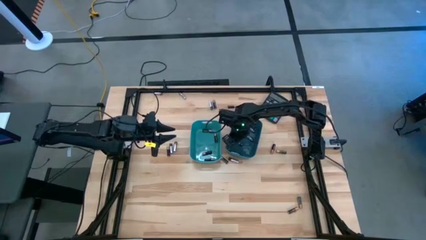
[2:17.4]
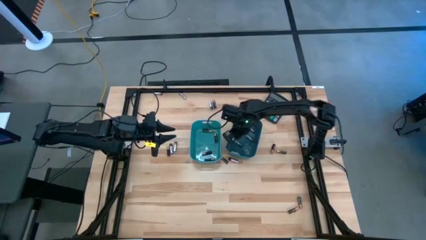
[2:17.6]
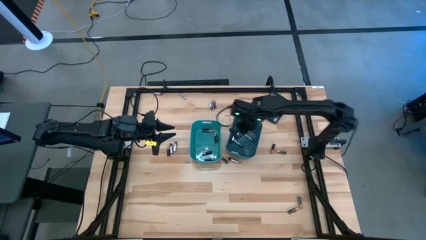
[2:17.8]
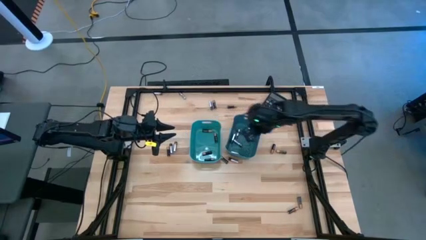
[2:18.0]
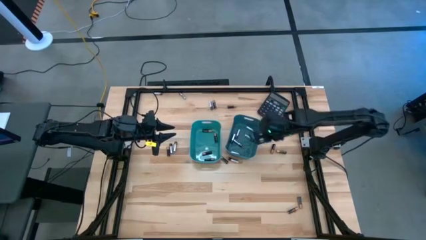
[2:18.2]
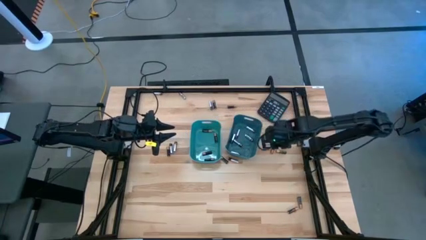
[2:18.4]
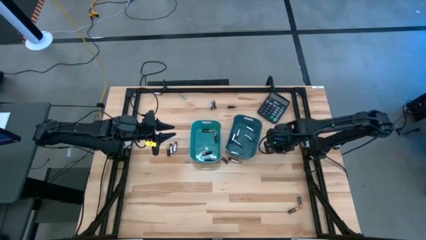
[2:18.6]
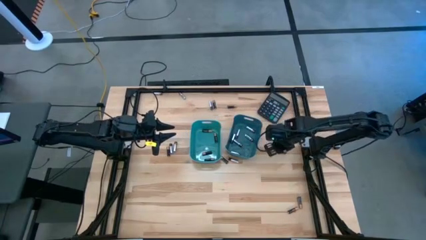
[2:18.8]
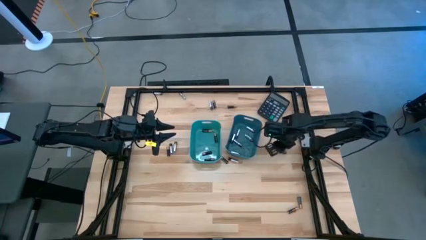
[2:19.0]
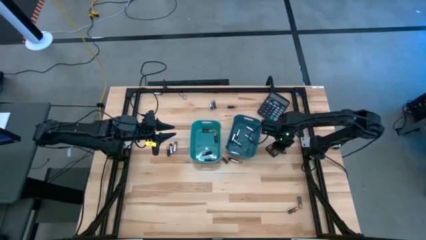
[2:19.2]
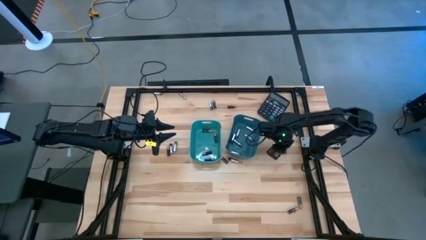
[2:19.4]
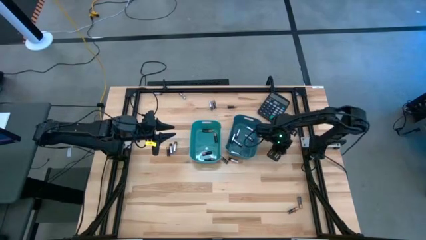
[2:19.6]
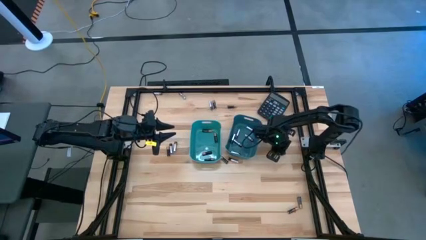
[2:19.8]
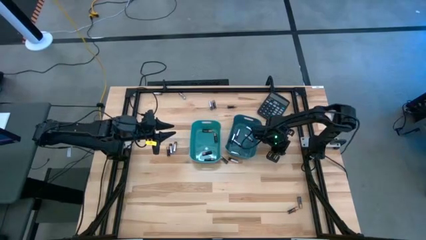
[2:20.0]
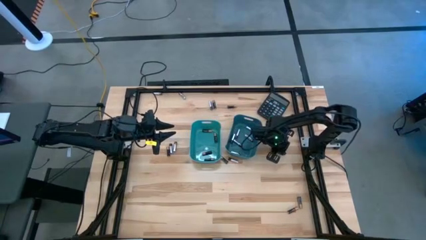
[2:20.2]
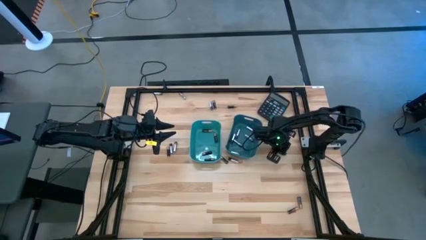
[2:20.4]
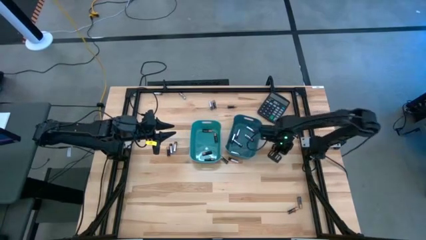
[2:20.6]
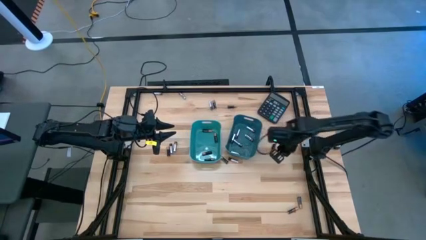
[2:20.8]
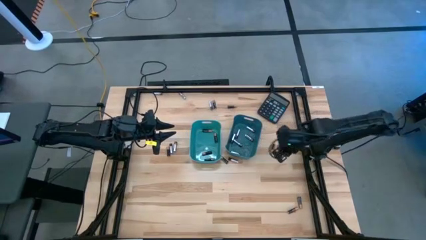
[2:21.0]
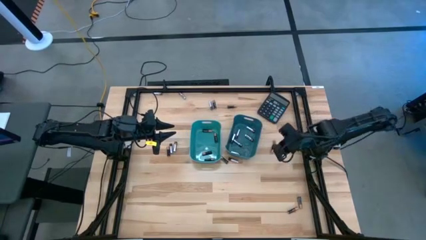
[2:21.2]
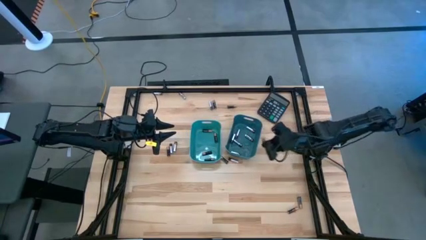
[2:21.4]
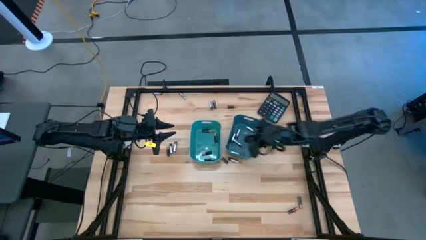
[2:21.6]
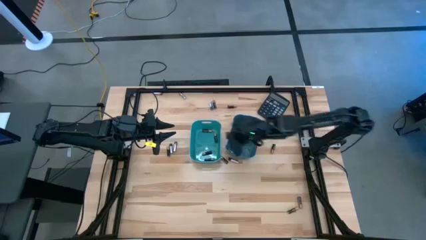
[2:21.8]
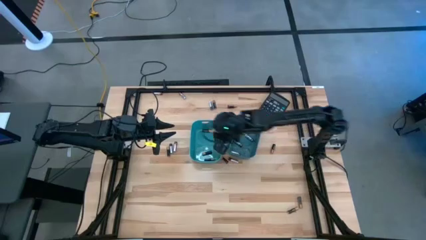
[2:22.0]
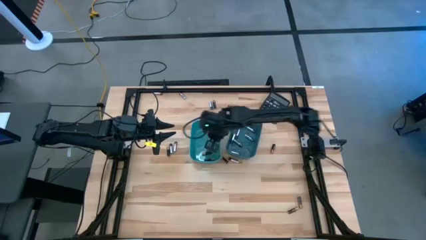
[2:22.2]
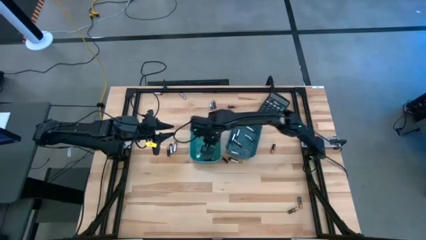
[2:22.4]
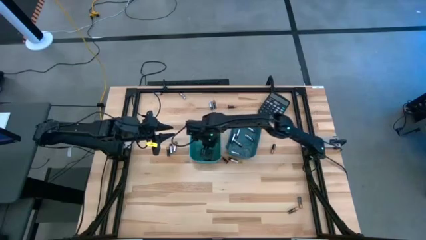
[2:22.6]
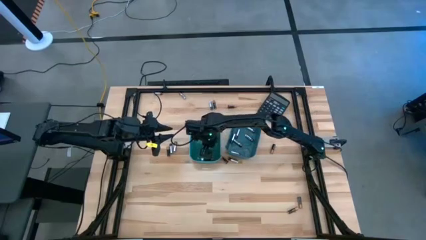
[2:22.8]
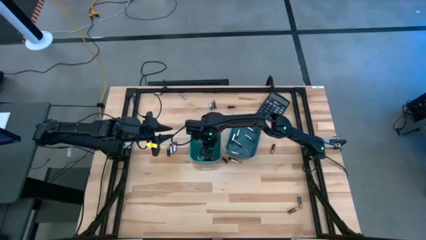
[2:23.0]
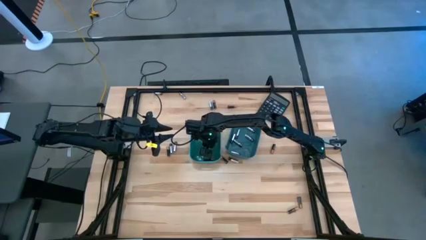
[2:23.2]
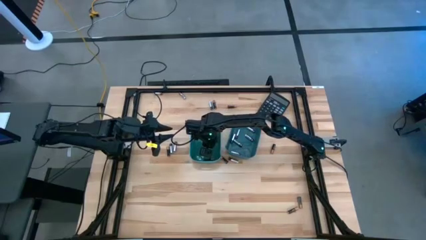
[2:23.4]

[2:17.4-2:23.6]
Task: Sort batteries
Put the black battery into the green bin

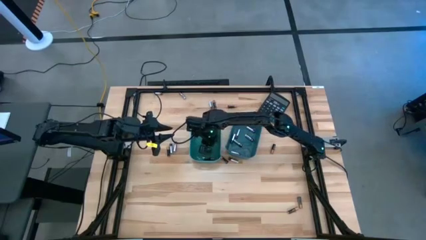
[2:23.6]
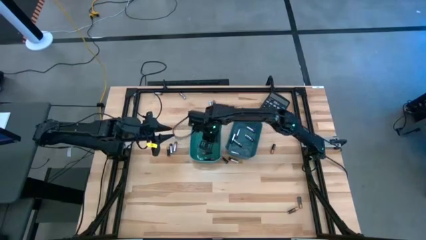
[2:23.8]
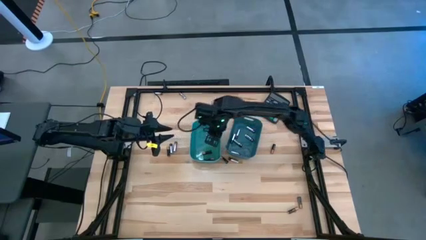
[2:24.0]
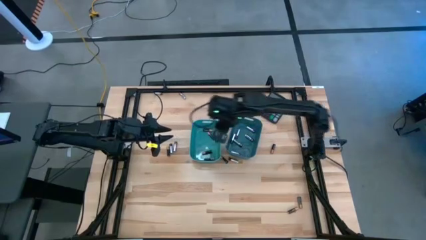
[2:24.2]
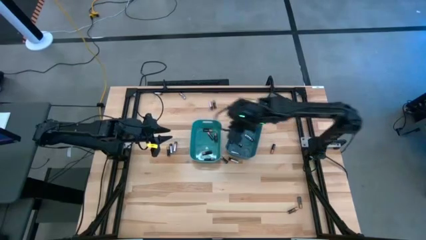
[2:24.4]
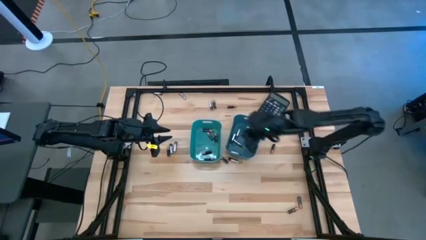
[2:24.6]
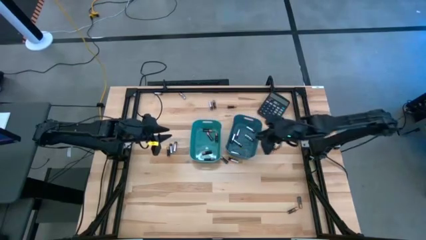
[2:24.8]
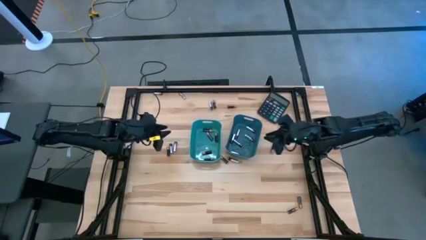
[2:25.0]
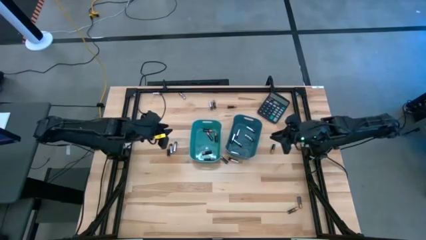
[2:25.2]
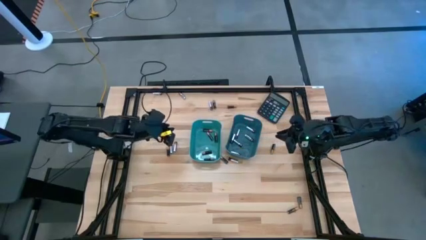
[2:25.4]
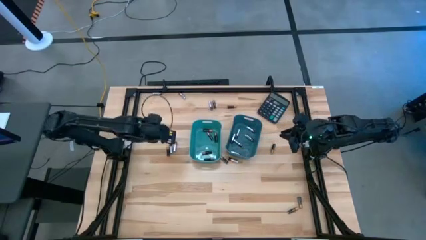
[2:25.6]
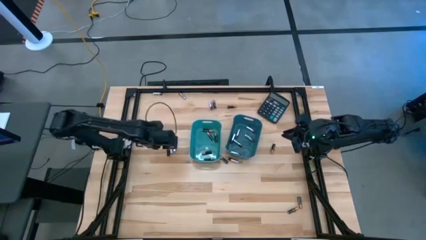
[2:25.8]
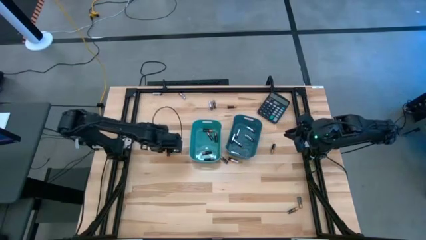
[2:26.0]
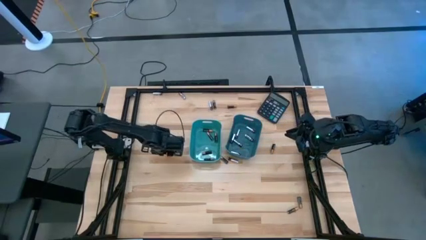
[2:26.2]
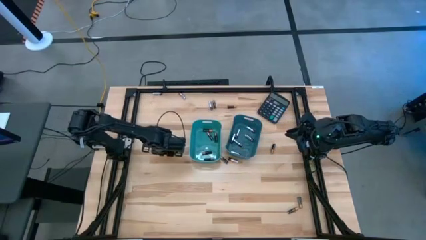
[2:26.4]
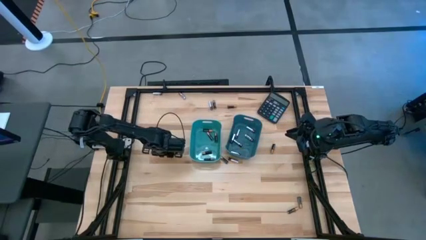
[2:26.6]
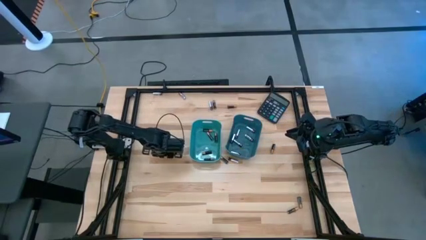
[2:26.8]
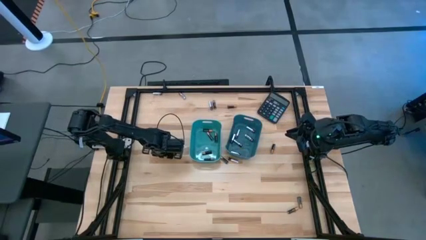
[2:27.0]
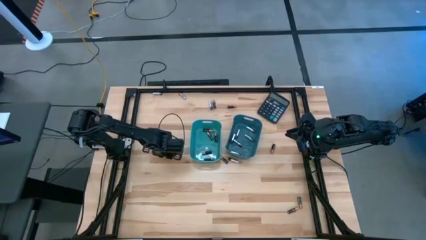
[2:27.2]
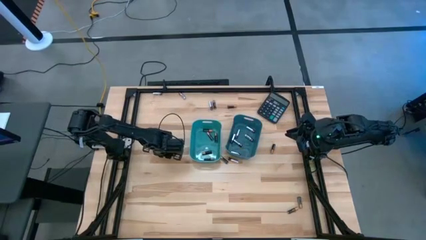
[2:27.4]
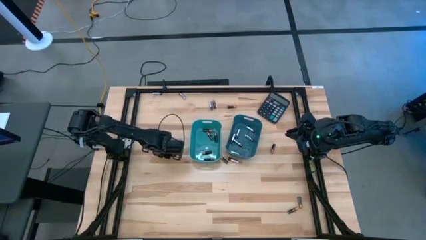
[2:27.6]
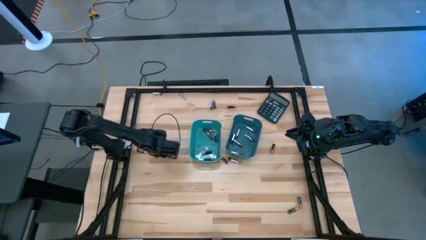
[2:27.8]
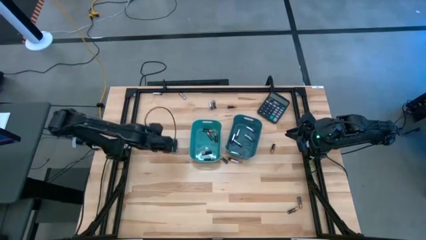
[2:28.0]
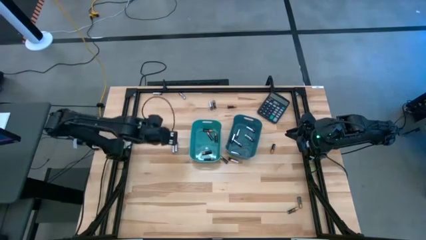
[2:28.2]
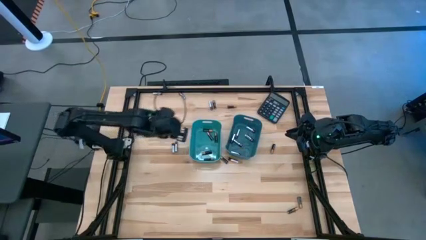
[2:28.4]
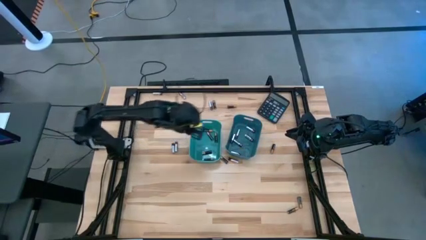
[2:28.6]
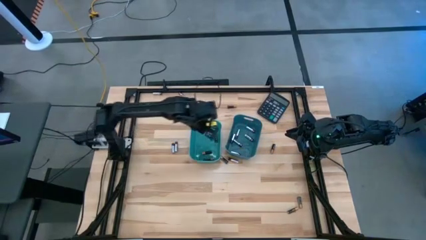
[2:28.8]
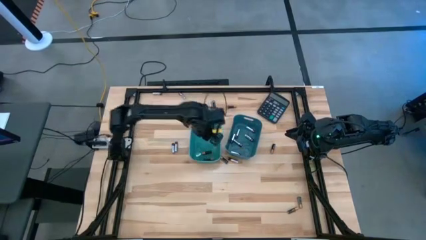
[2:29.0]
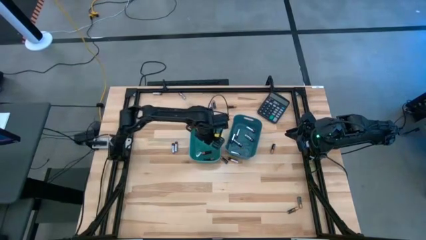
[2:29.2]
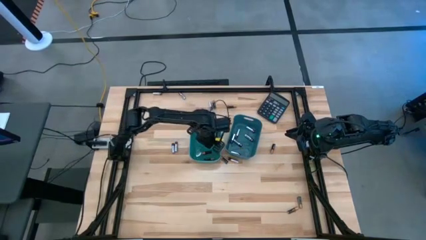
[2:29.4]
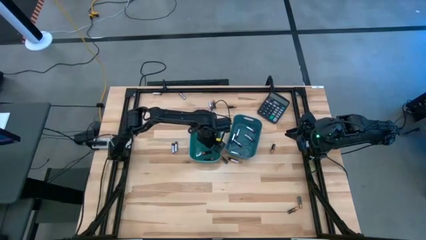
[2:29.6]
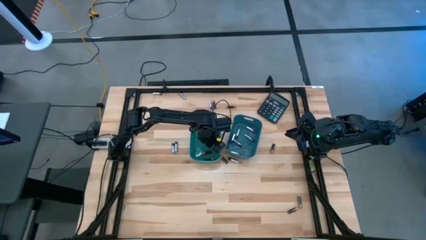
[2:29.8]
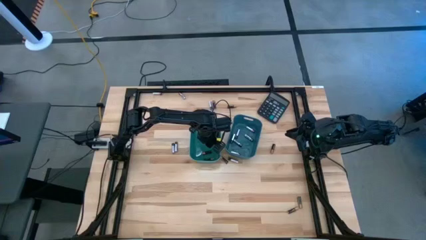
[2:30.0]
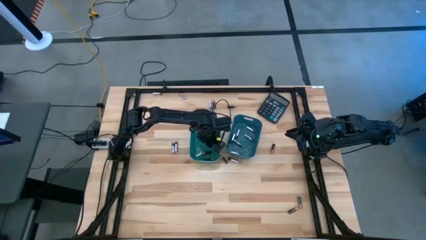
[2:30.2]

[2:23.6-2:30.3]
Put the black battery into the green bin

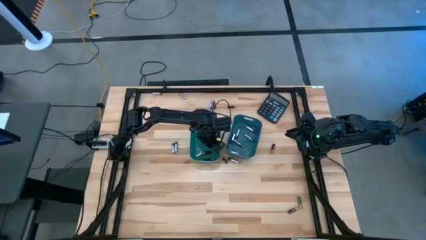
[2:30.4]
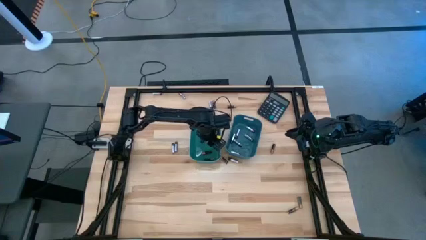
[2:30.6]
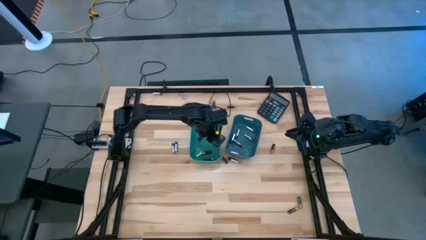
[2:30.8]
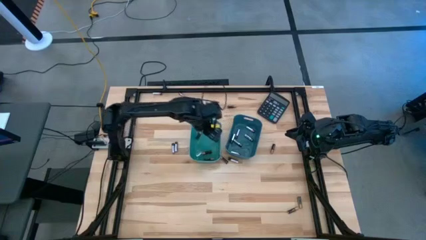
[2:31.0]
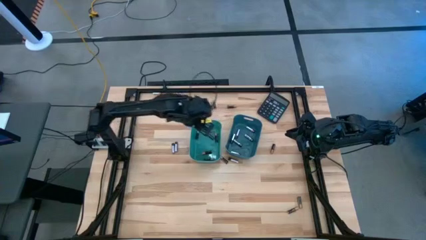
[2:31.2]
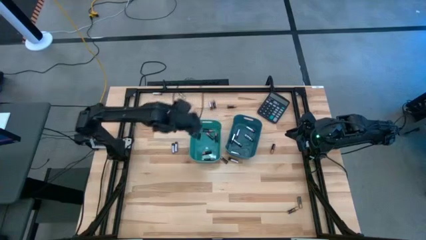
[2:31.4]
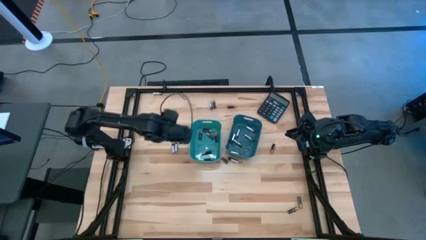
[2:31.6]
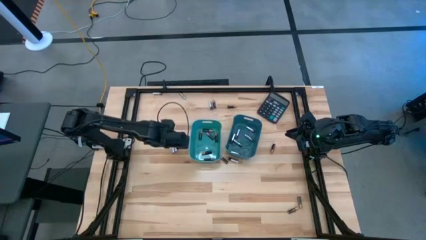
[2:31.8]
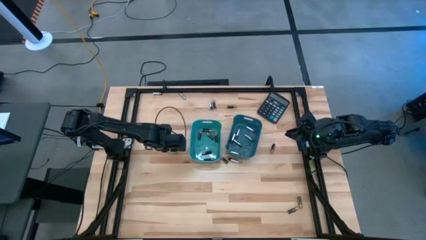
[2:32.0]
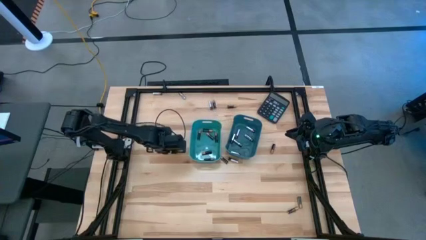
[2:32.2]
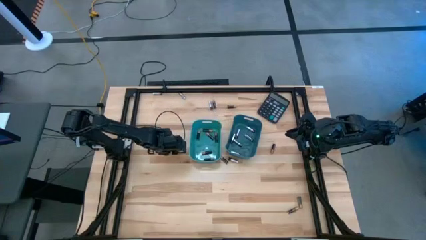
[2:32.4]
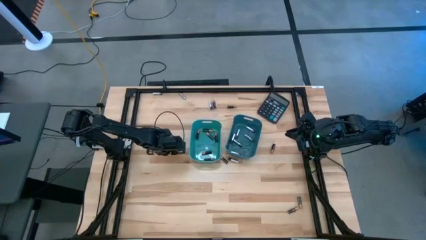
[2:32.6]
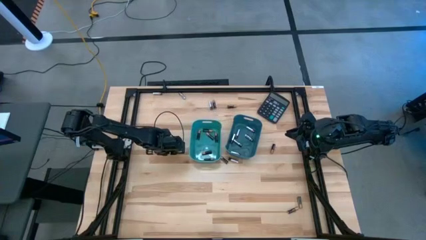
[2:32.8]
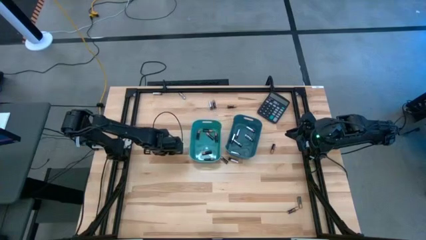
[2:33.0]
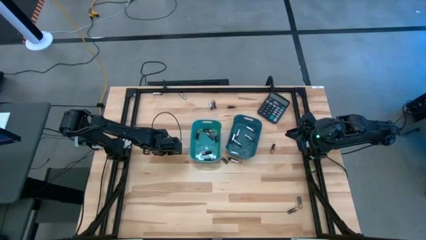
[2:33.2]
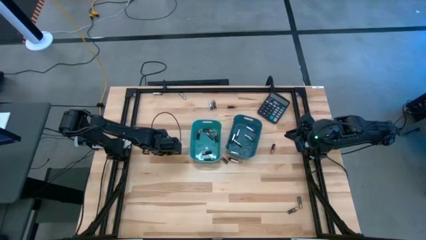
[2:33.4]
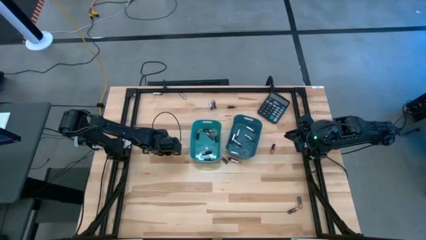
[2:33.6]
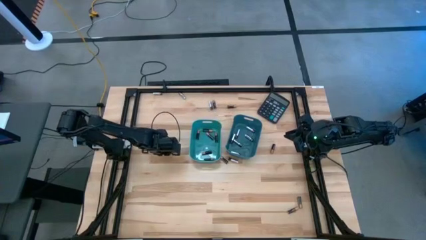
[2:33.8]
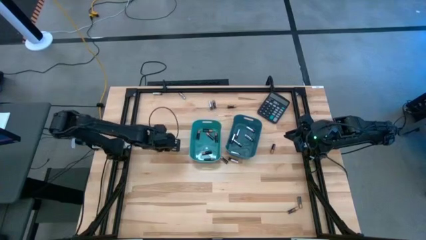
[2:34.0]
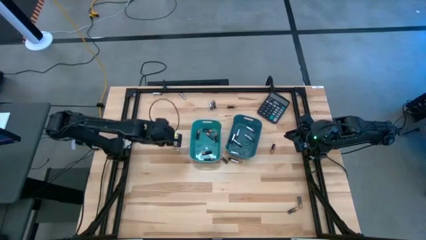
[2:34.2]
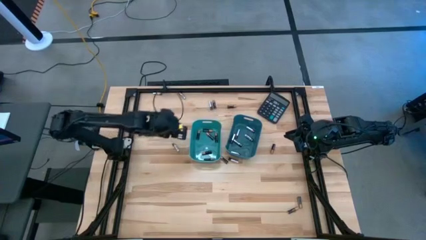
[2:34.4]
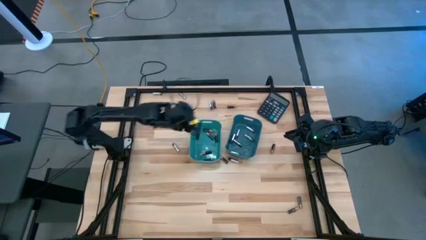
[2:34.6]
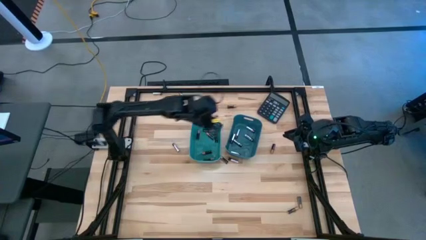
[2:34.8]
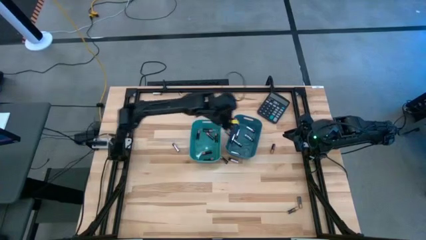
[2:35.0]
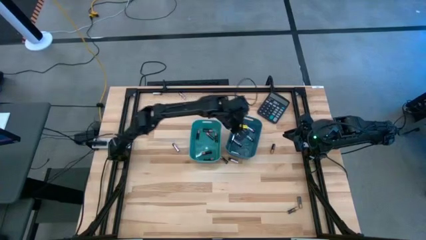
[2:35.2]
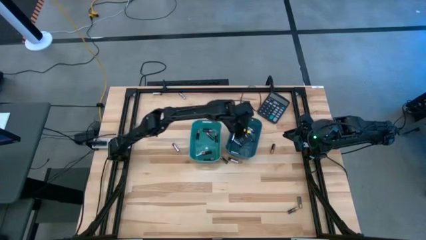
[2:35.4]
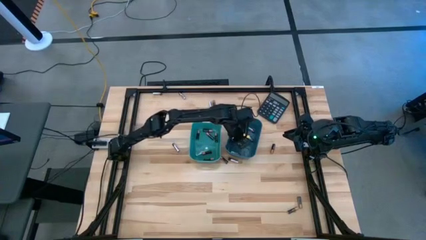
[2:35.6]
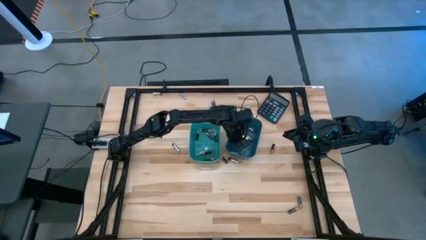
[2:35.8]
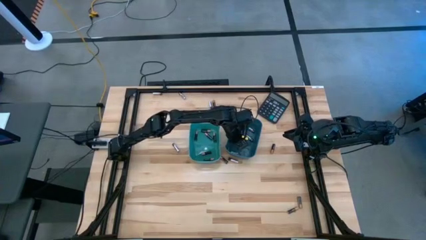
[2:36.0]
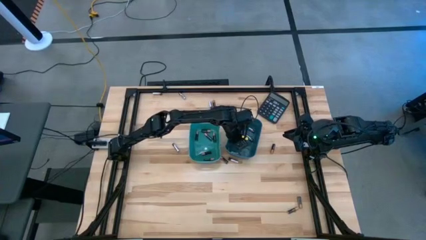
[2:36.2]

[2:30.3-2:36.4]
Put the silver battery into the blue bin
